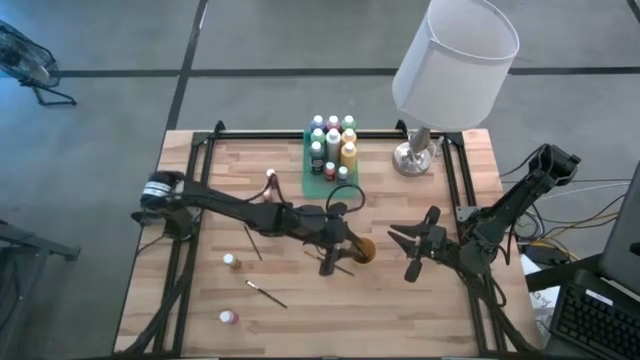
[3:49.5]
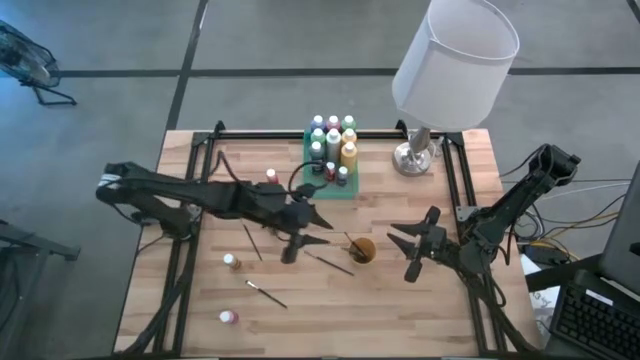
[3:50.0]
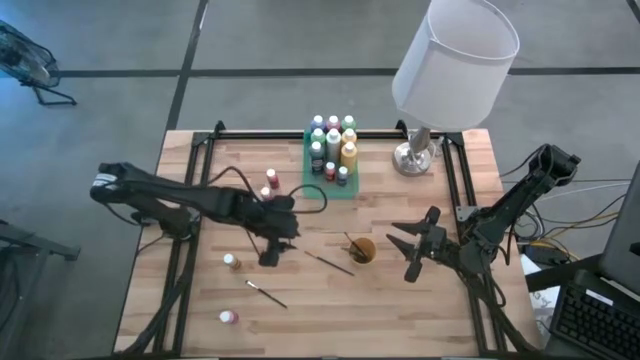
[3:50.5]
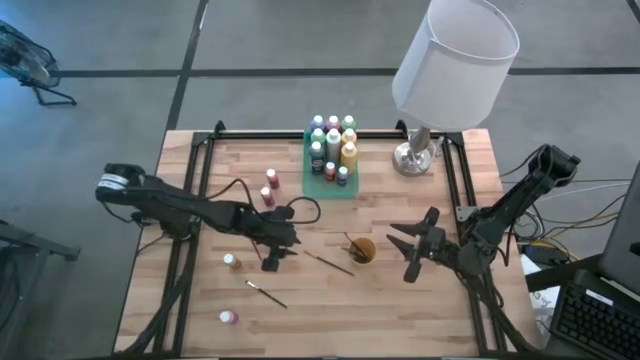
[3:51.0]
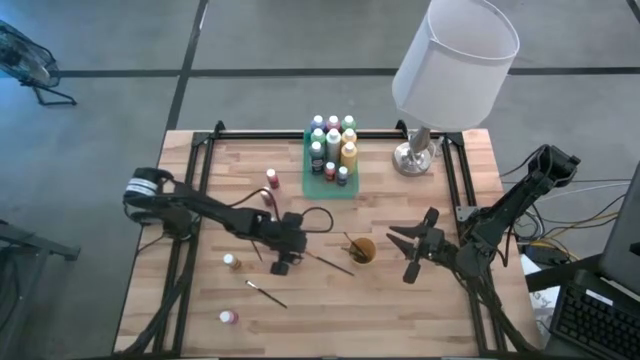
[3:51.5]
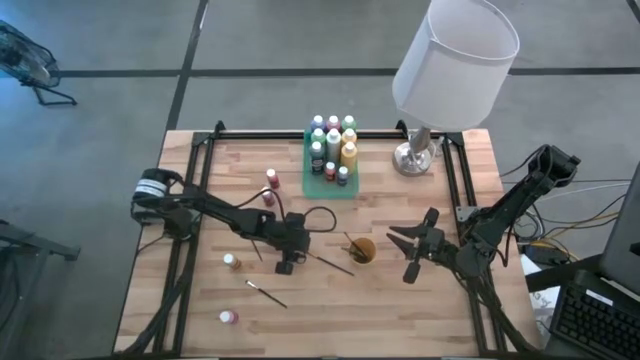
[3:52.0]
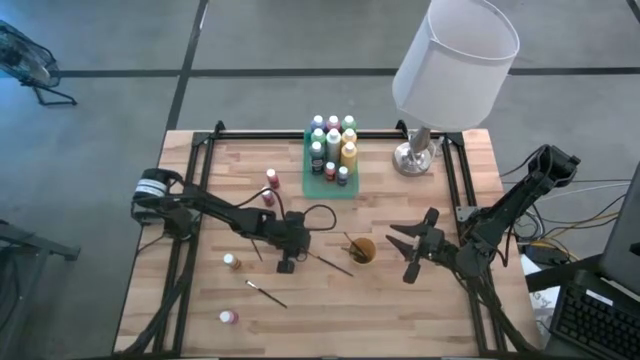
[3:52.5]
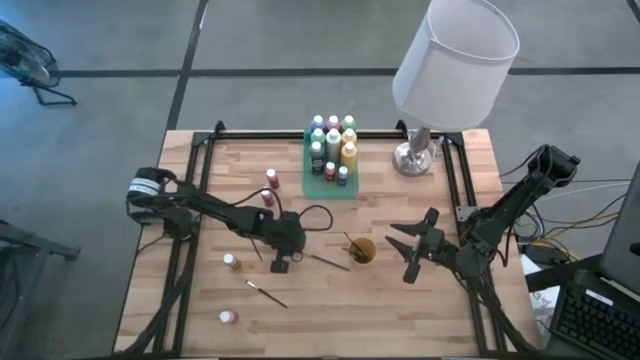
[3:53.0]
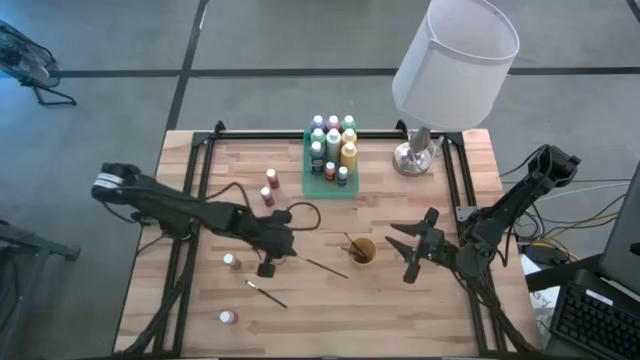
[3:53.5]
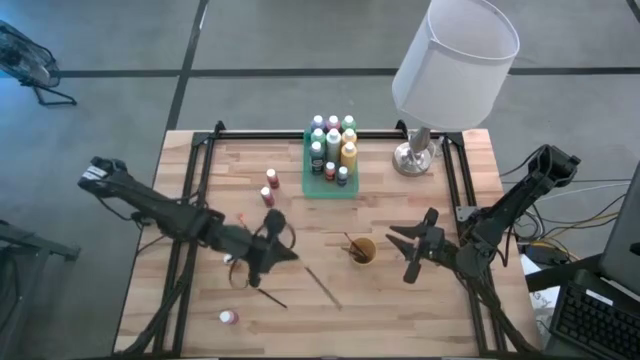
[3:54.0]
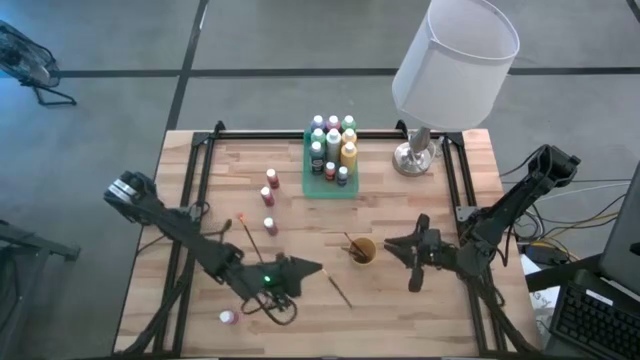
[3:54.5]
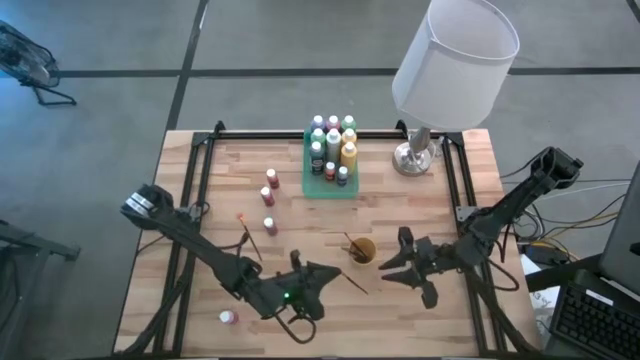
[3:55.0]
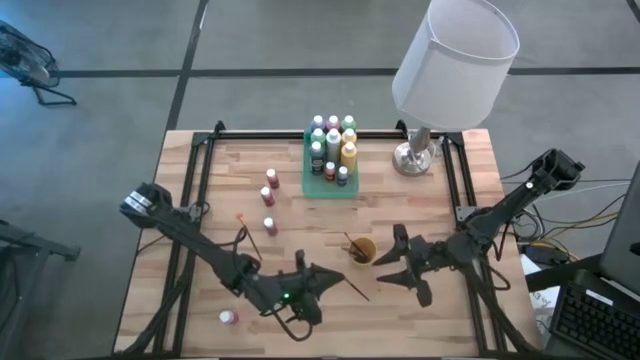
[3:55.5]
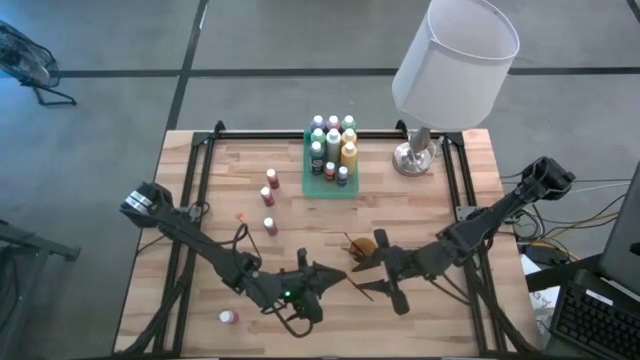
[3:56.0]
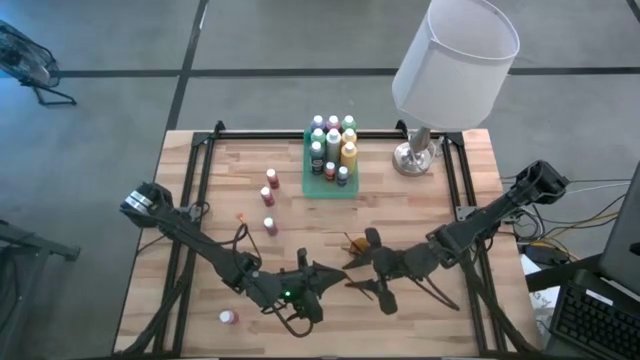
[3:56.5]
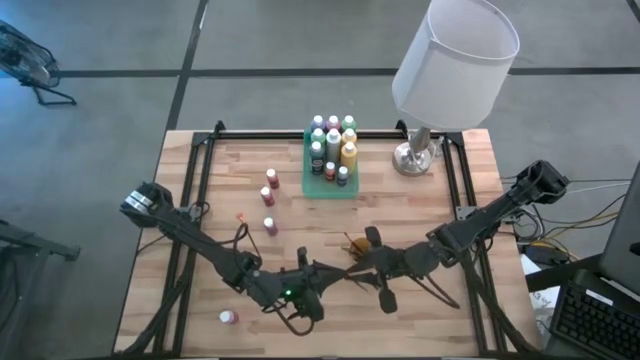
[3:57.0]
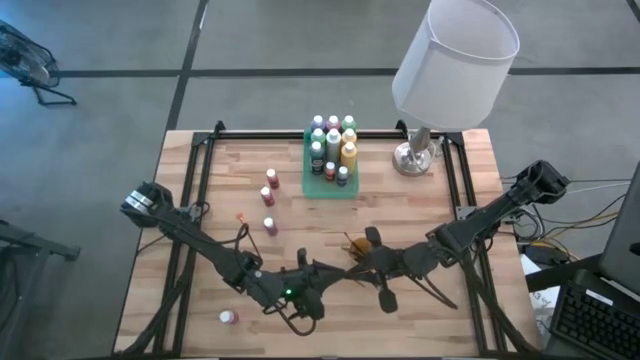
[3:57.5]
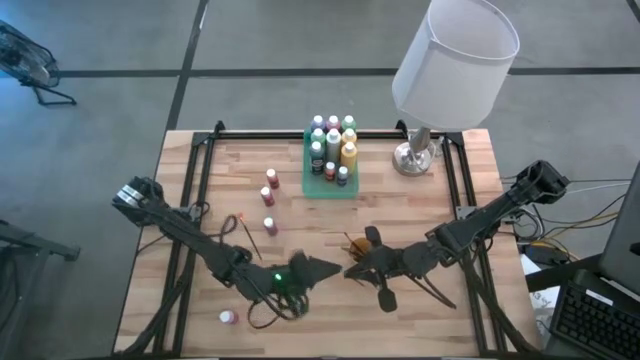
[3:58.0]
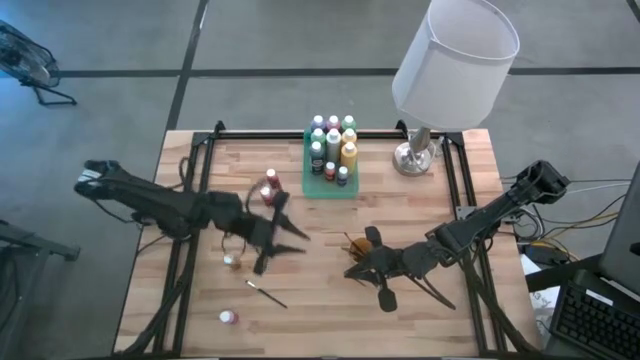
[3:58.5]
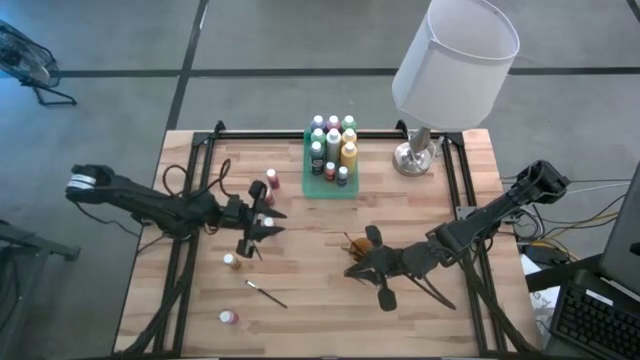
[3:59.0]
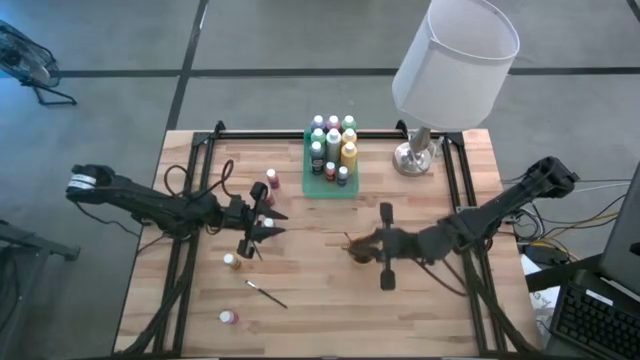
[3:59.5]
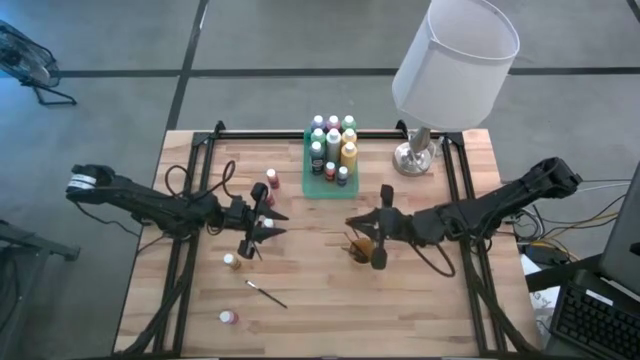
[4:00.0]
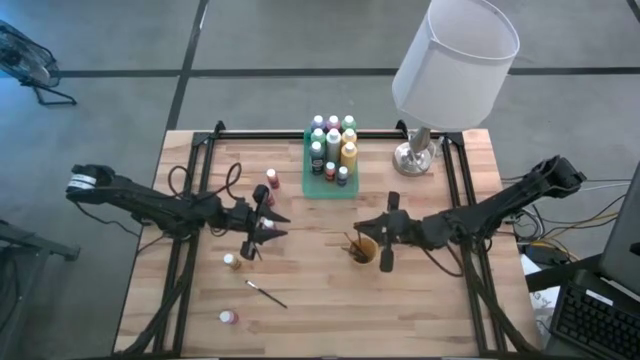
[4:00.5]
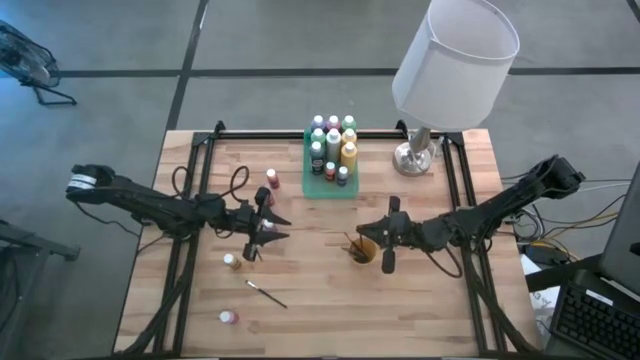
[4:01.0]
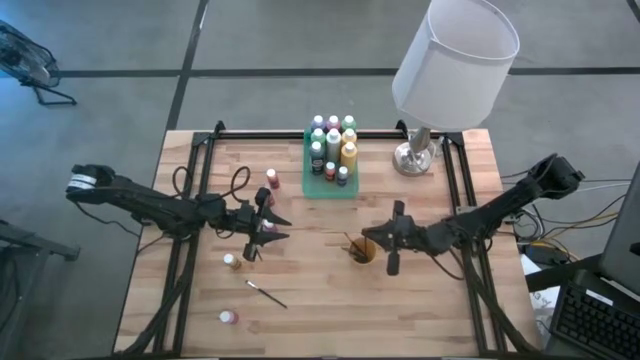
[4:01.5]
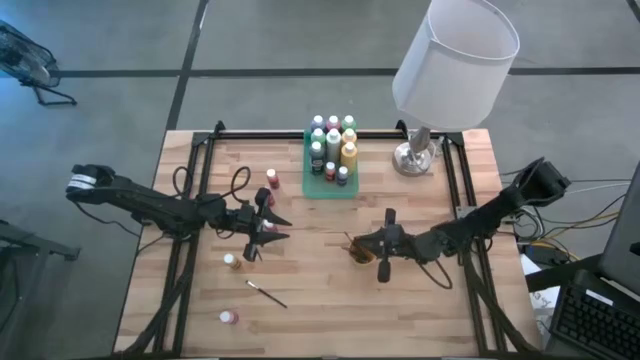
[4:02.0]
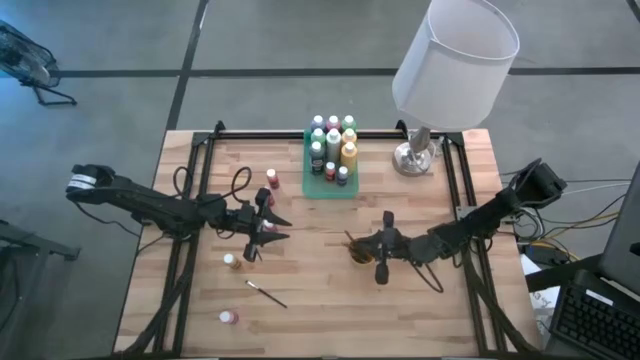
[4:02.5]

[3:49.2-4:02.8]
Task: Pick & Place Paint Supplies
Put the orange paintbrush into the yellow cup

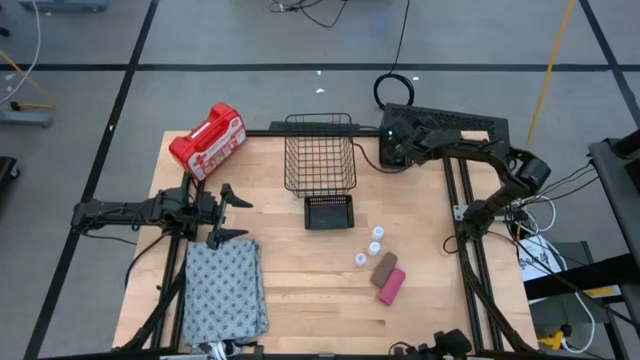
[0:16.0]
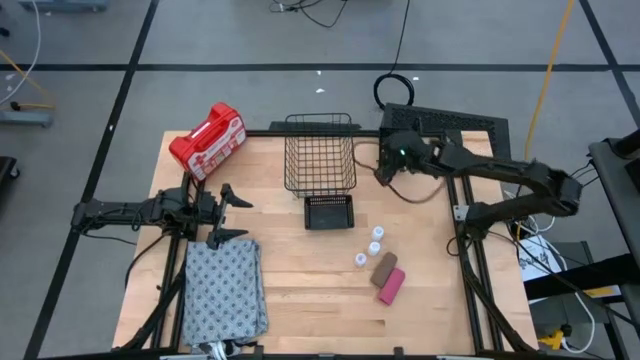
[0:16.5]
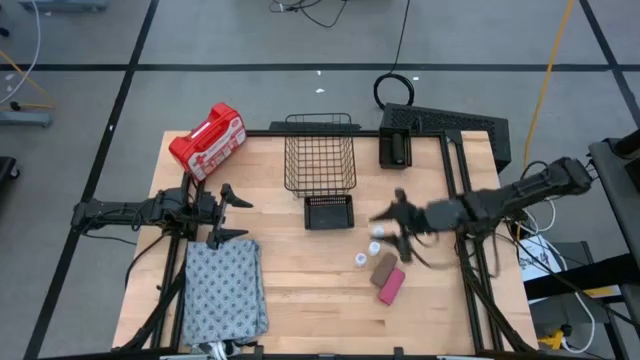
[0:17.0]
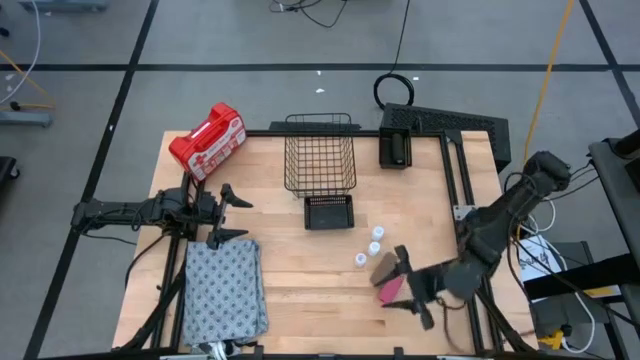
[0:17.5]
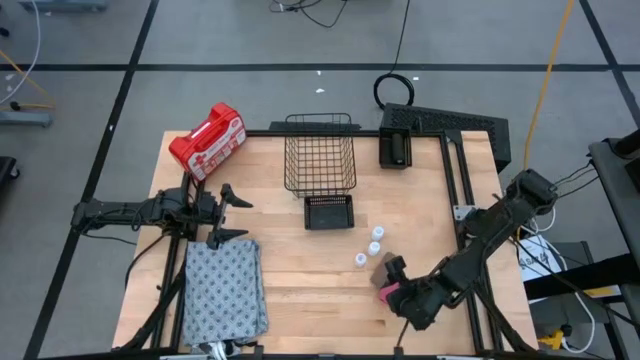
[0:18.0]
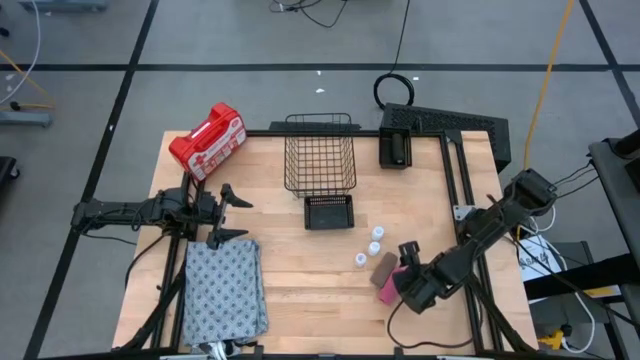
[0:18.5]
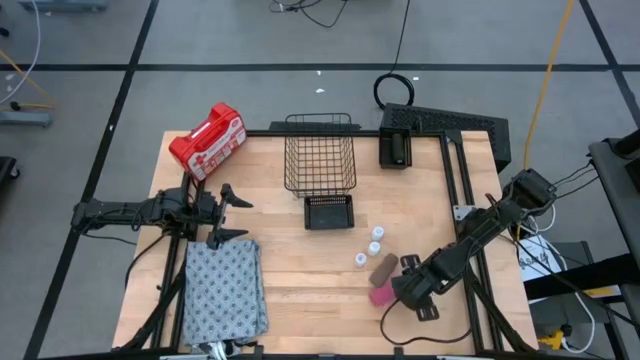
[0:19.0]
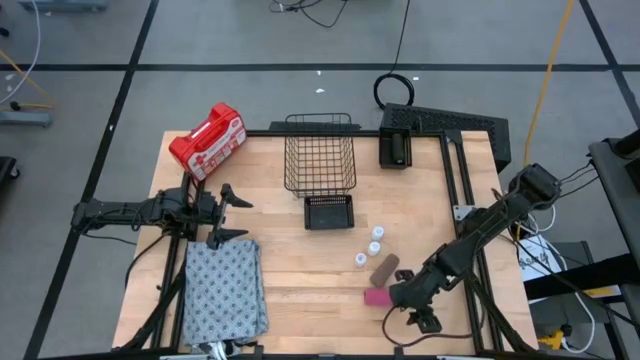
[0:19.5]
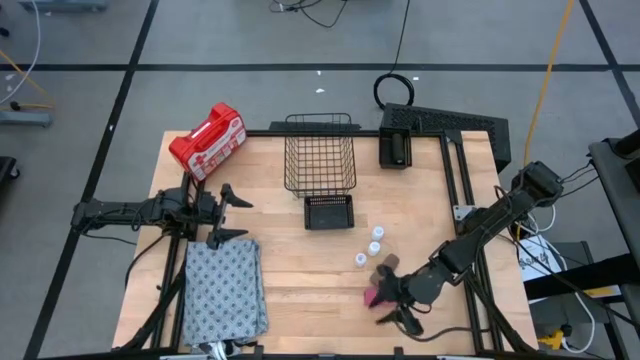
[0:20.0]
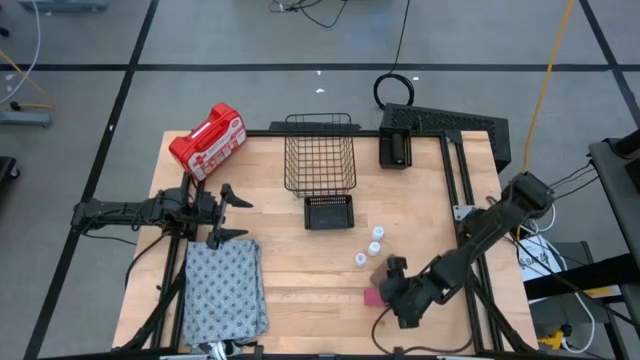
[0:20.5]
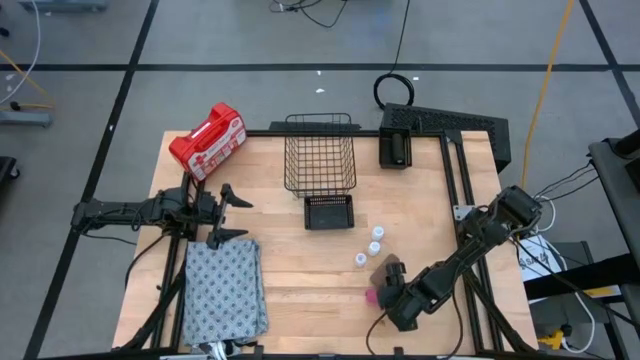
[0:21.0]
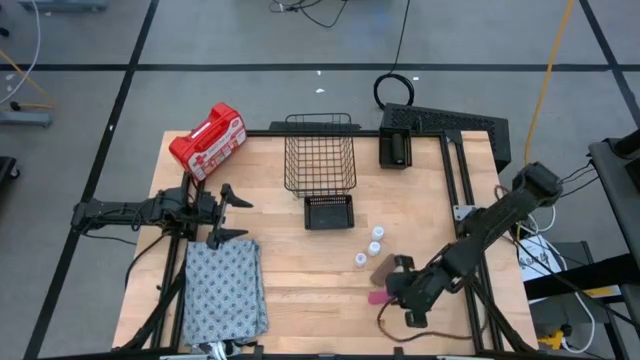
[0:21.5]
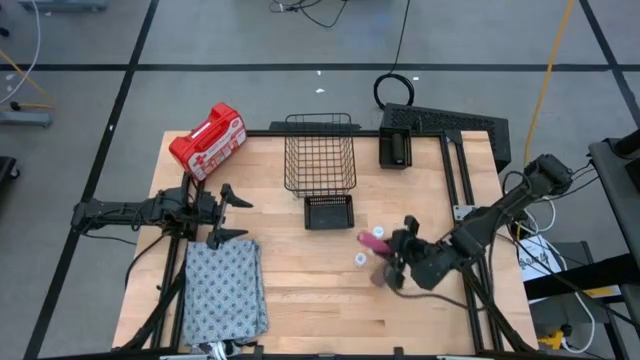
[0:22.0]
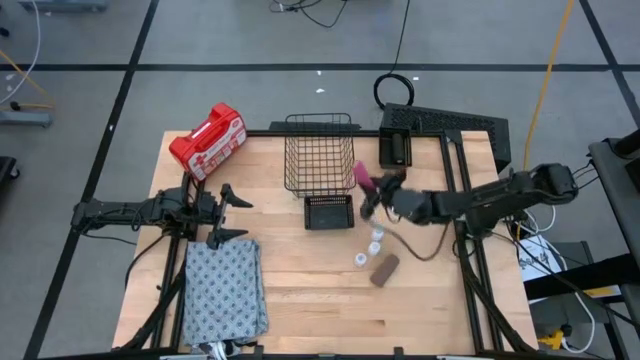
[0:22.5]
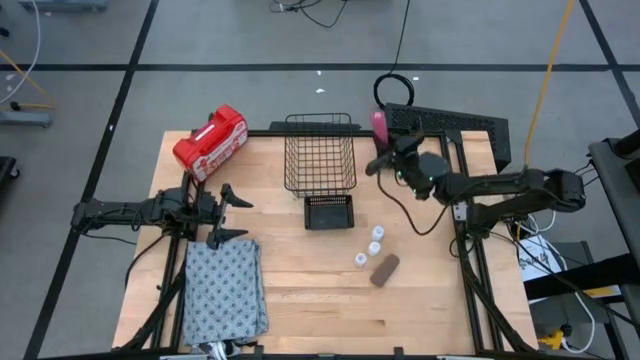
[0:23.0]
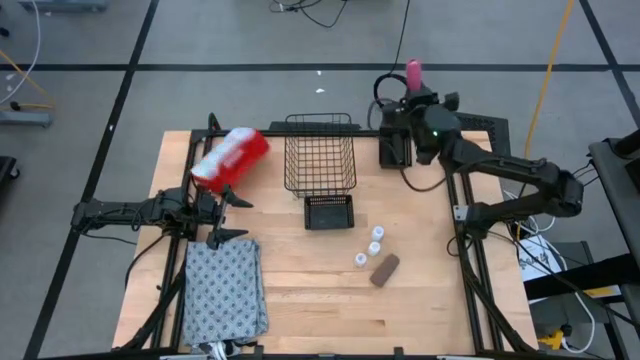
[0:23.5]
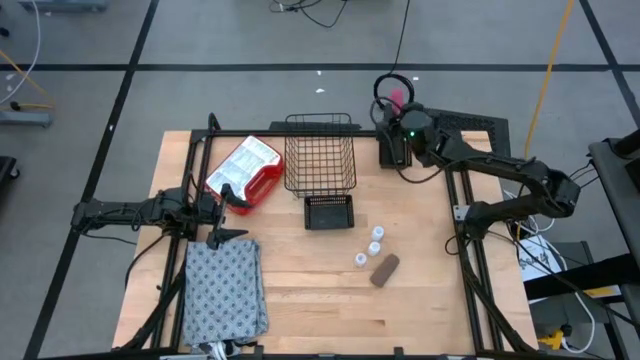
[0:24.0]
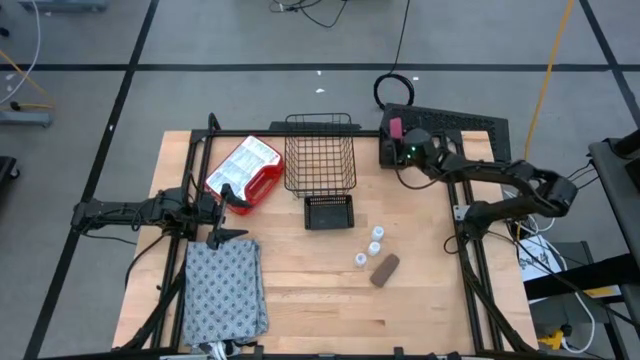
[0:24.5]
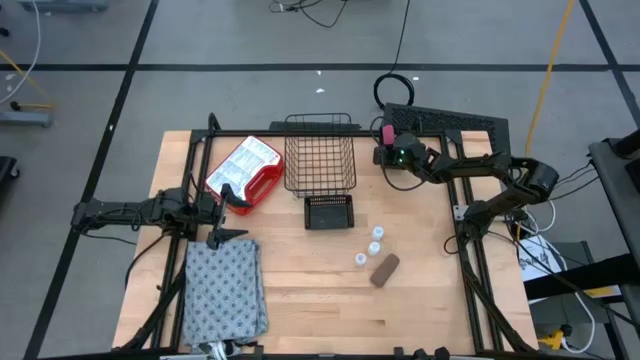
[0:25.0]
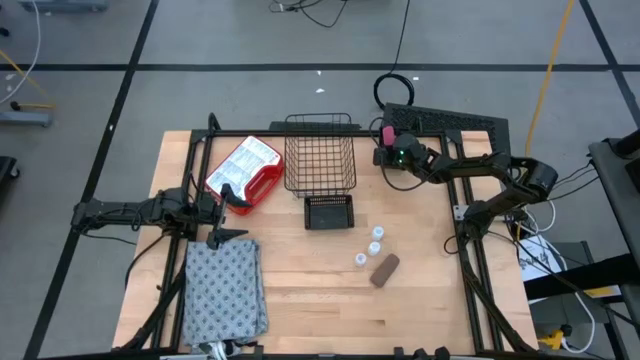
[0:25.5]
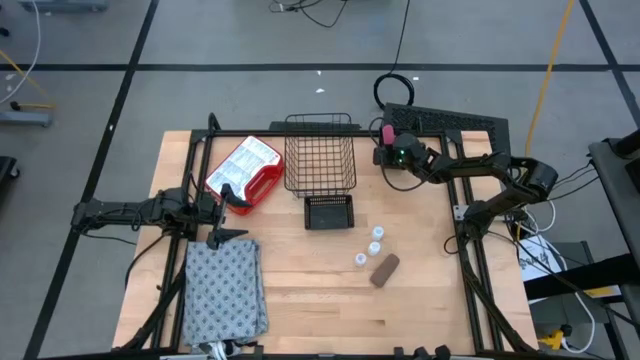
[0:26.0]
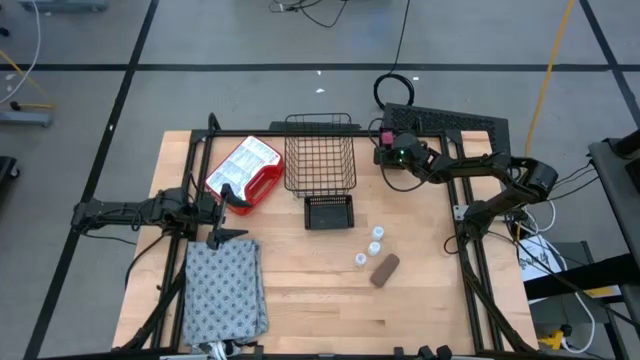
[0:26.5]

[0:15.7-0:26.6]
Task: Pick & place medical supplies in basket/bin
Put the rolled pink bandage into the top black bin
